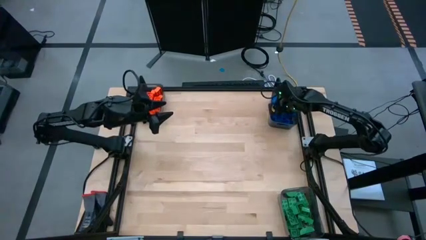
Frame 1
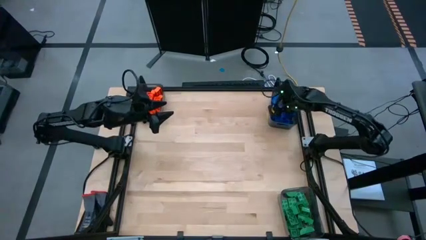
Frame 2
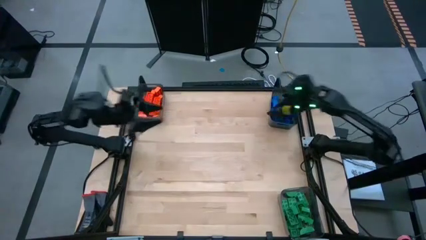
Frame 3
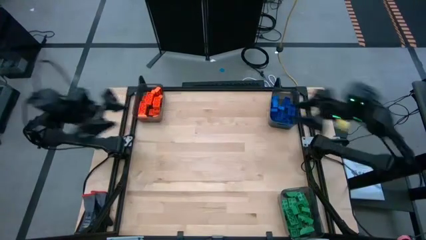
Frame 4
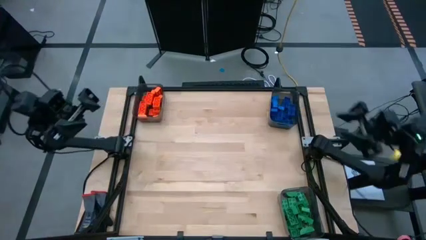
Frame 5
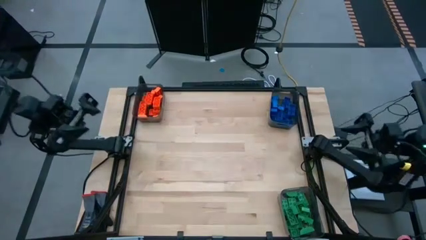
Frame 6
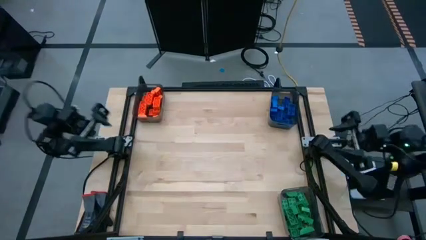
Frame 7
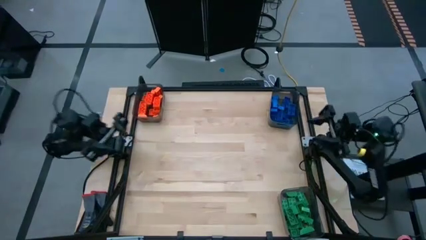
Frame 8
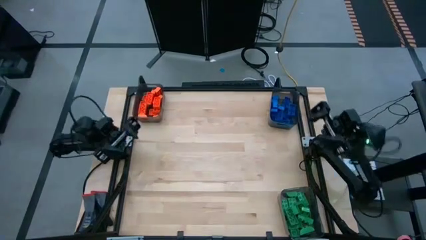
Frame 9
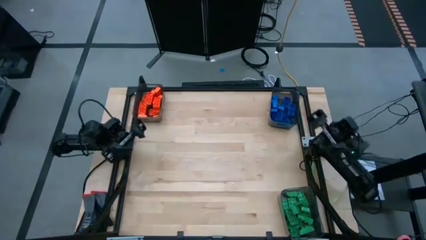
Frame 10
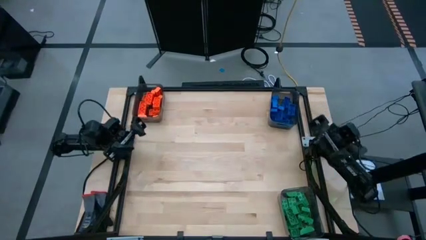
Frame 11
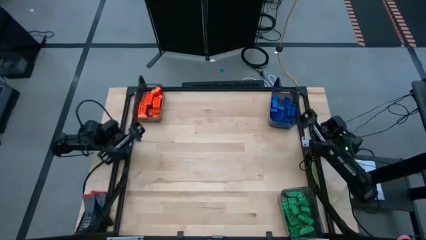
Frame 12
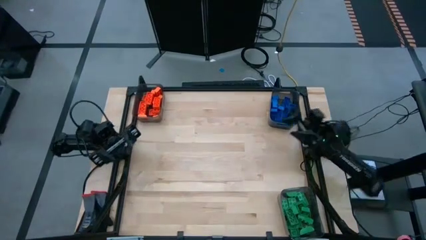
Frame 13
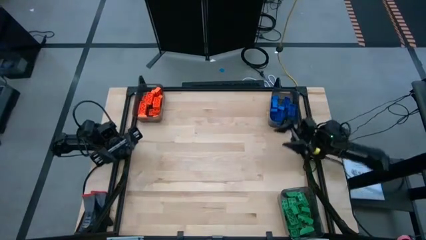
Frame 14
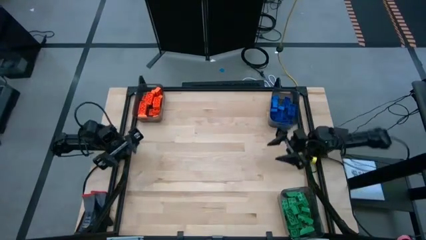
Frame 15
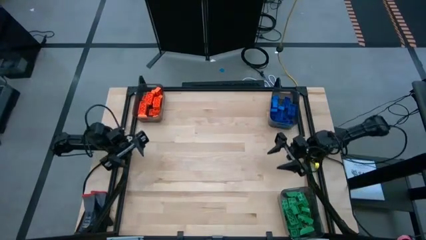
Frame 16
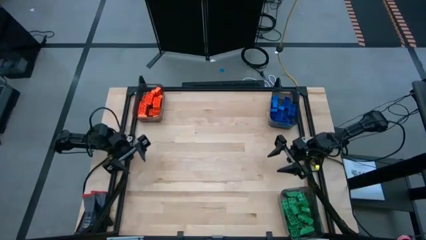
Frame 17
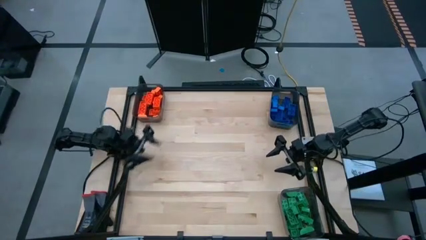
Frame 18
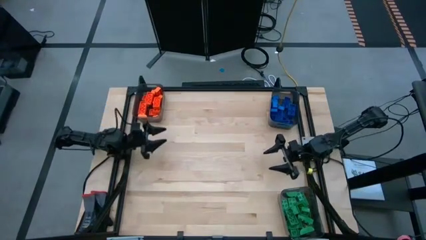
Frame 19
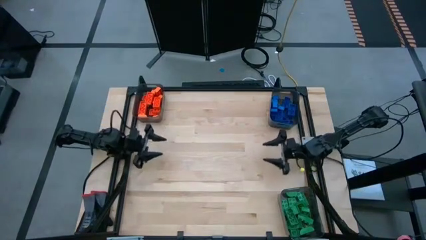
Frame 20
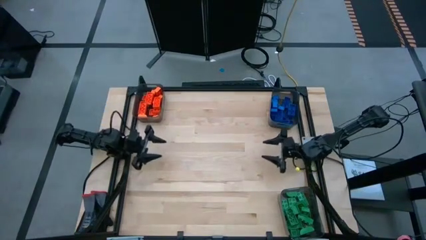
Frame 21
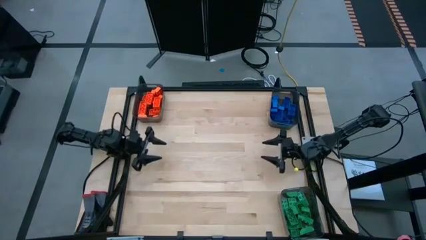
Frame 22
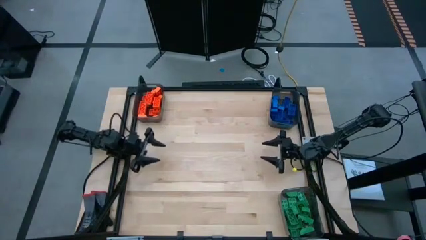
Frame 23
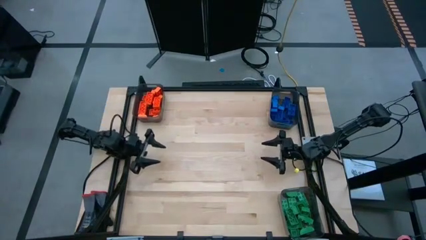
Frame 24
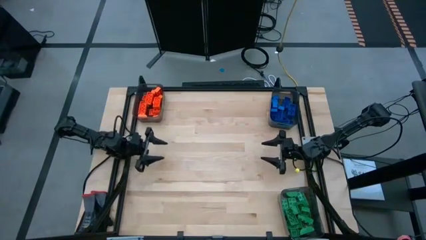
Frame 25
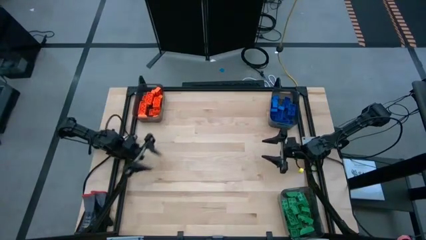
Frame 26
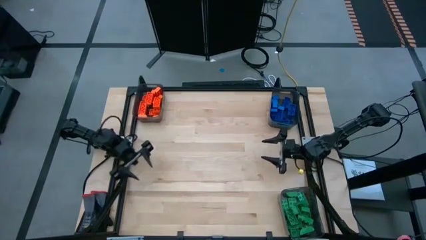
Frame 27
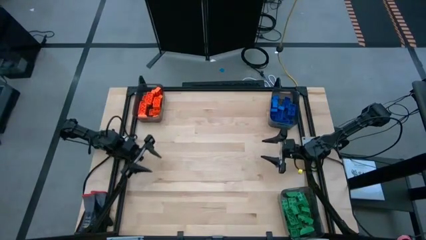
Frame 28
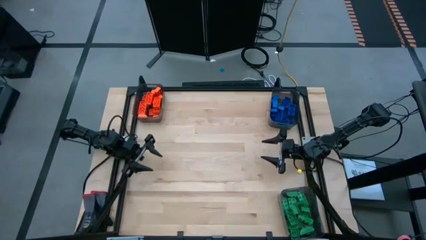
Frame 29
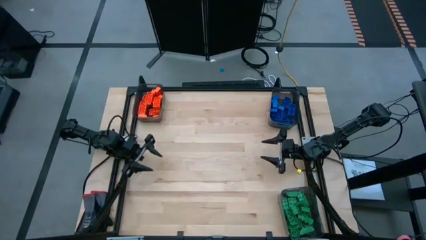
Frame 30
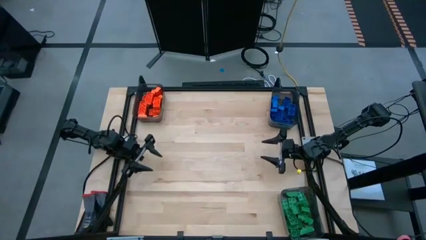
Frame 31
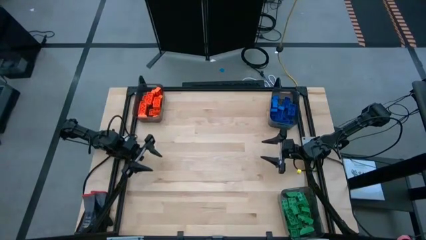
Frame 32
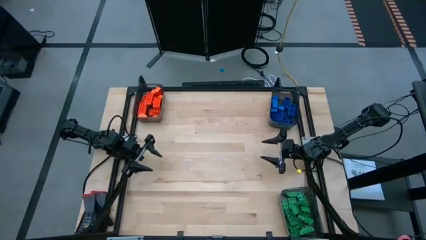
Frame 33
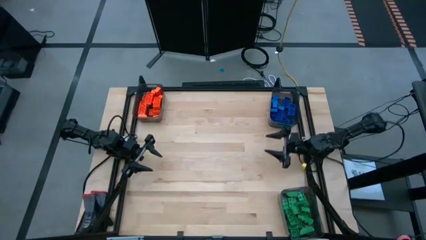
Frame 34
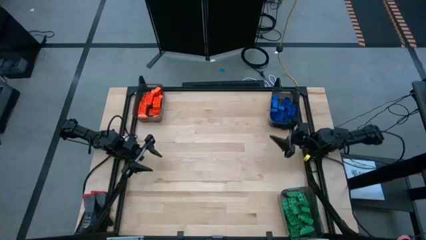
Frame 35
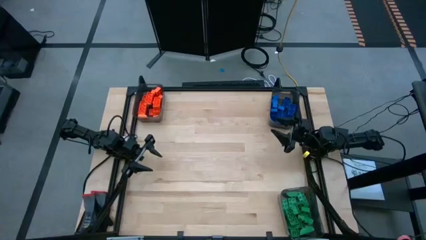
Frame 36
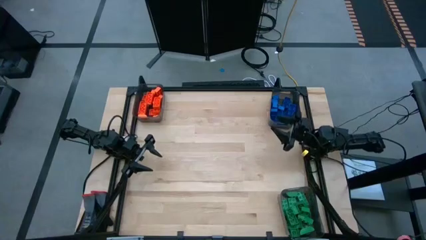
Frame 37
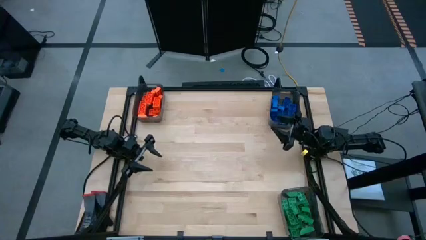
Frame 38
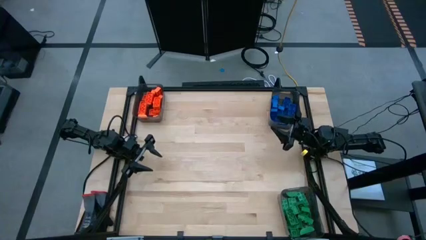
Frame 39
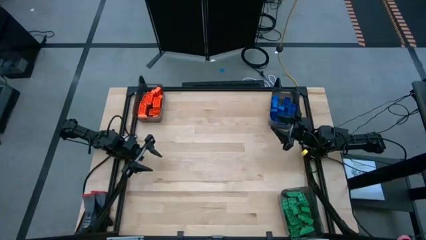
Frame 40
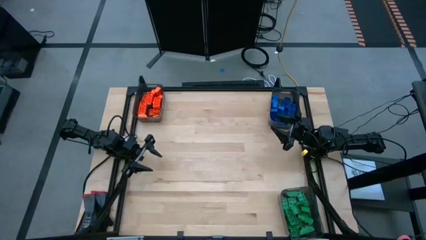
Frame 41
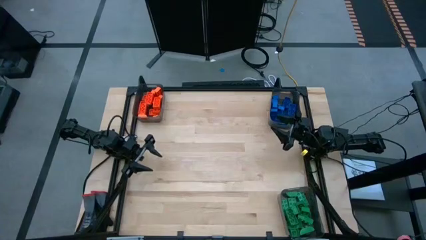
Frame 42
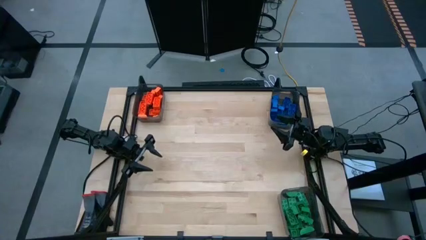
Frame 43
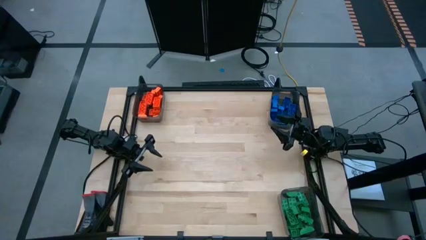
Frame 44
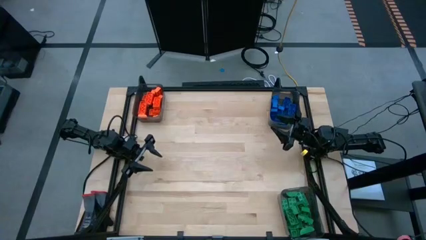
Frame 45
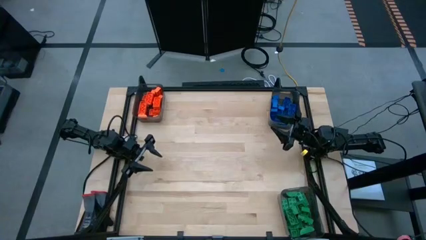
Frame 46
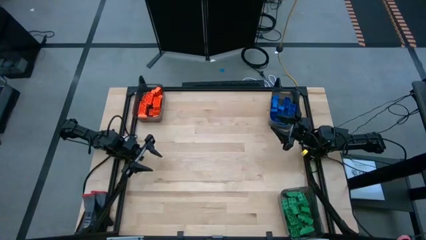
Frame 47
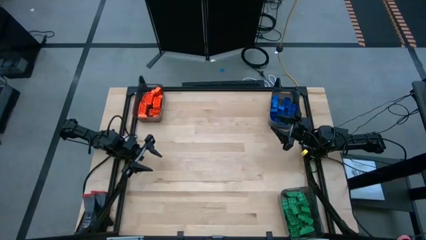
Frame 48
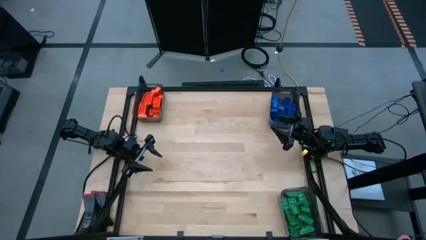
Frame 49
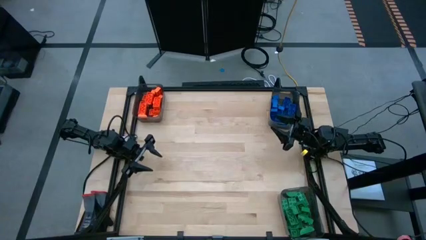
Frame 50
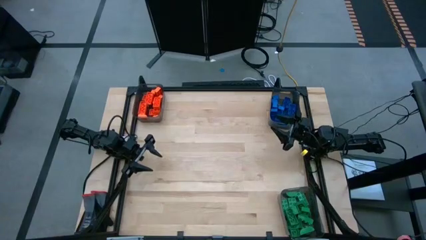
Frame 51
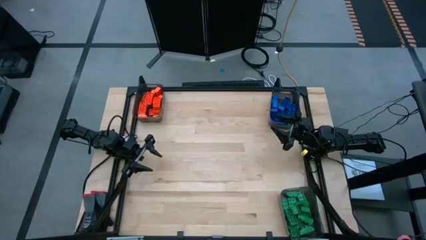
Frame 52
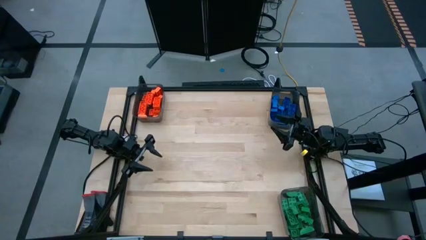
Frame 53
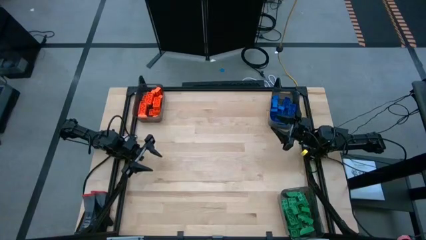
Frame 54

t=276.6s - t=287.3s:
Task: Sort blocks
Return to Home Position

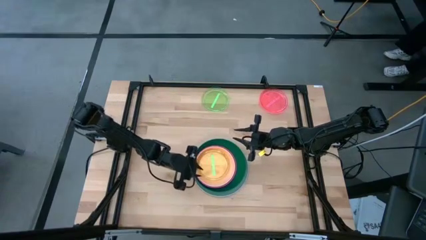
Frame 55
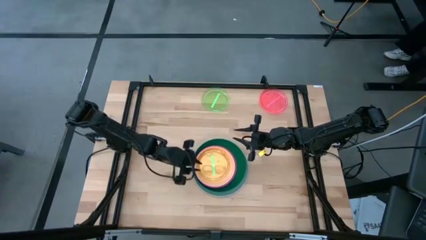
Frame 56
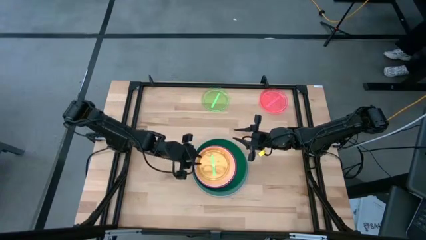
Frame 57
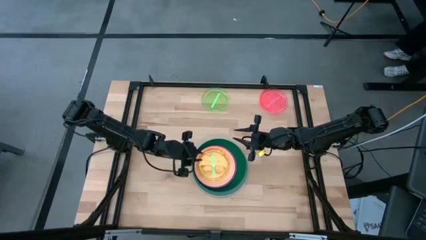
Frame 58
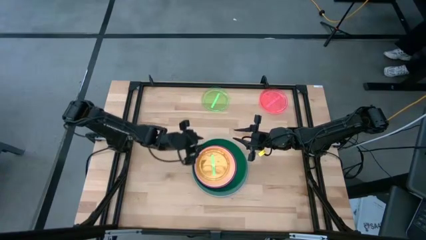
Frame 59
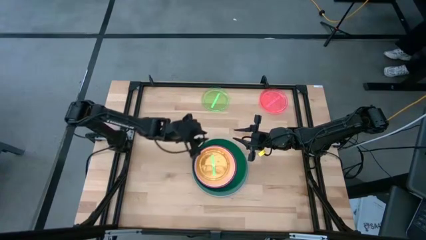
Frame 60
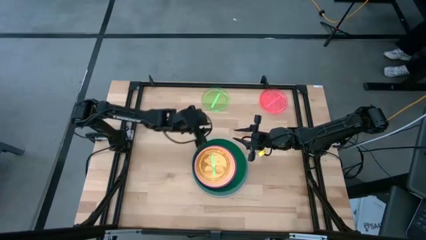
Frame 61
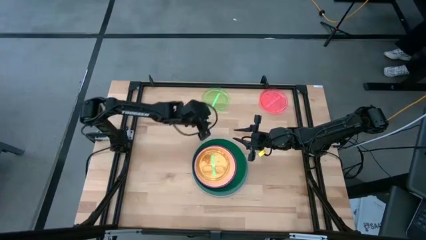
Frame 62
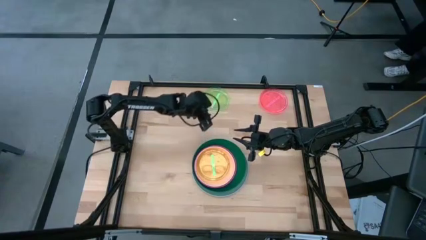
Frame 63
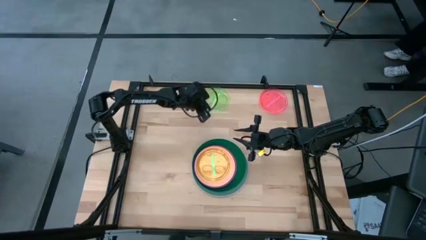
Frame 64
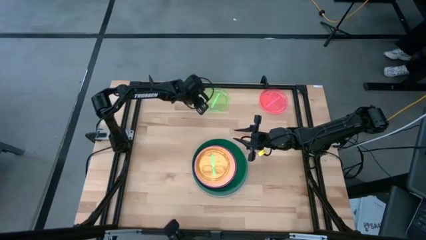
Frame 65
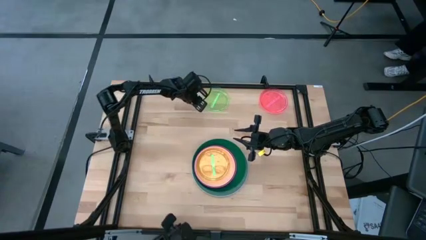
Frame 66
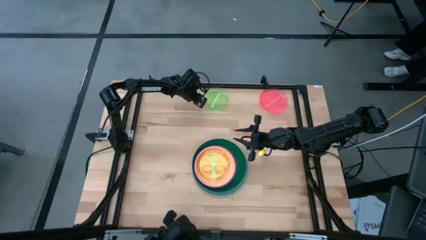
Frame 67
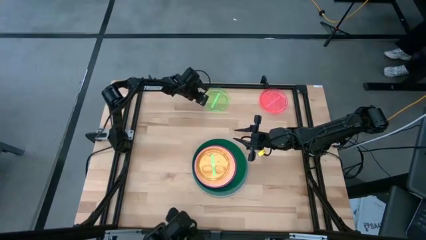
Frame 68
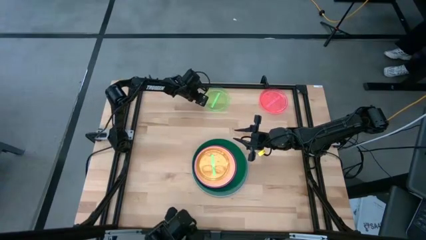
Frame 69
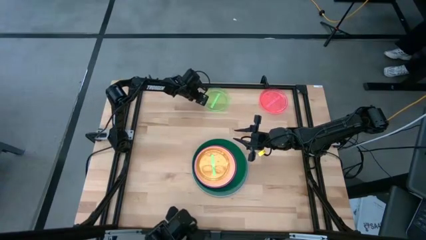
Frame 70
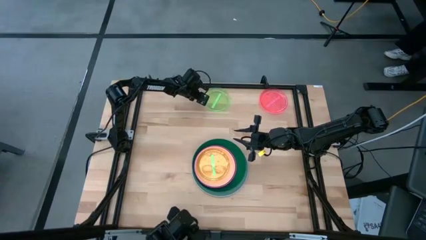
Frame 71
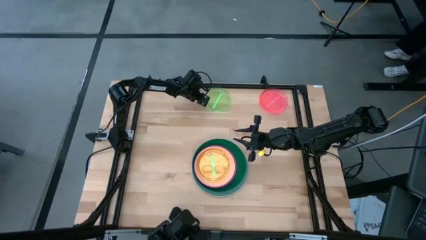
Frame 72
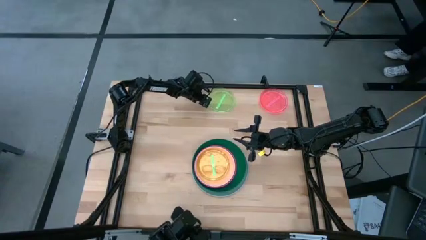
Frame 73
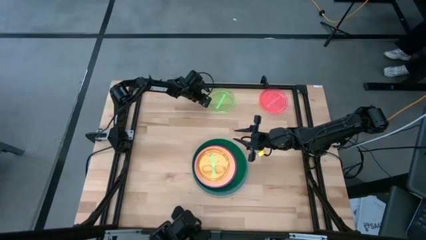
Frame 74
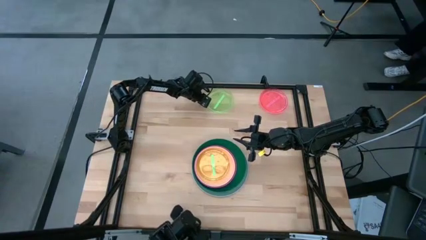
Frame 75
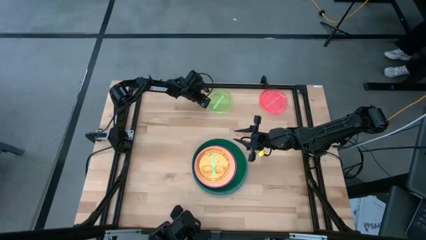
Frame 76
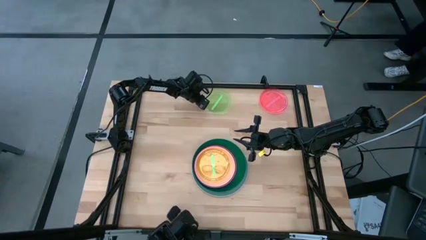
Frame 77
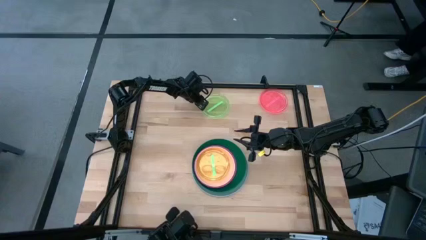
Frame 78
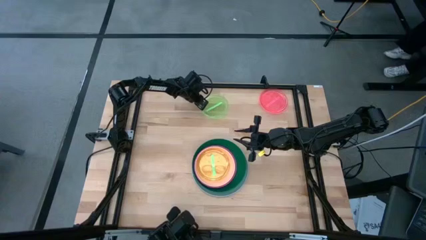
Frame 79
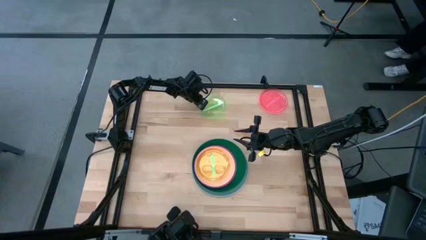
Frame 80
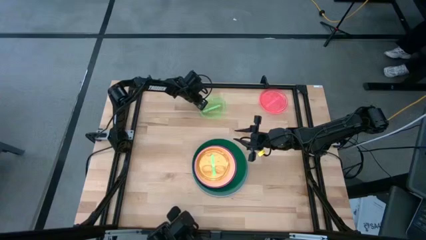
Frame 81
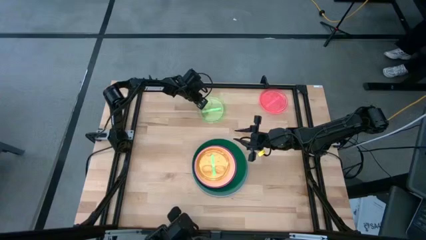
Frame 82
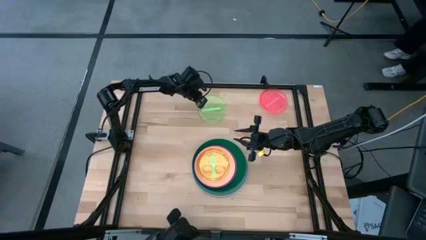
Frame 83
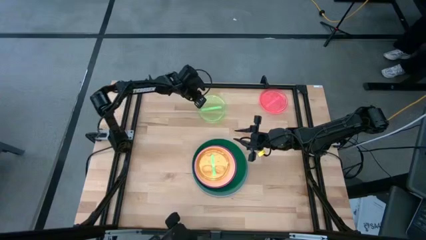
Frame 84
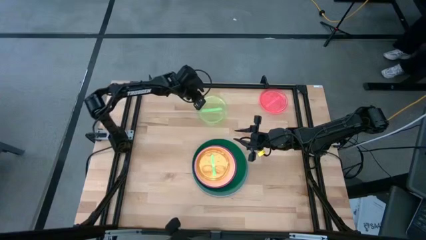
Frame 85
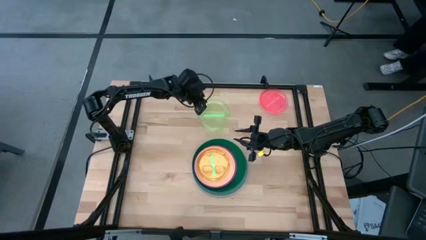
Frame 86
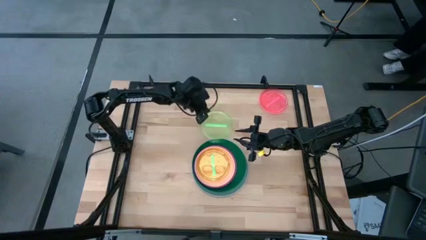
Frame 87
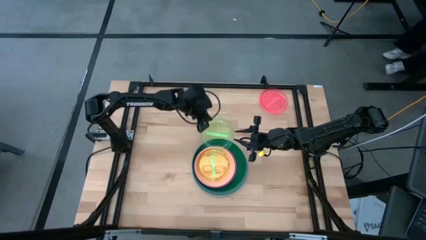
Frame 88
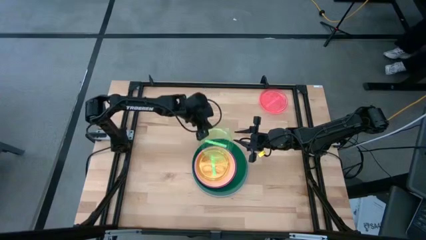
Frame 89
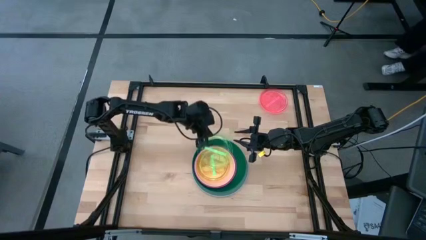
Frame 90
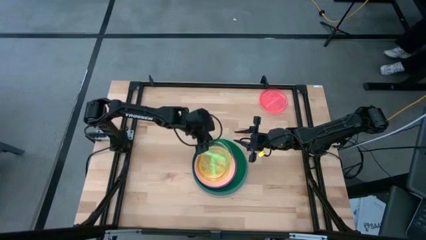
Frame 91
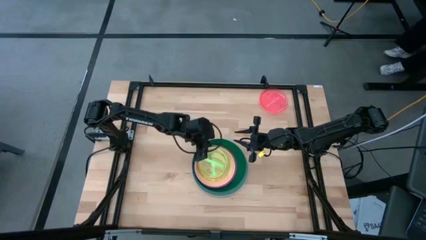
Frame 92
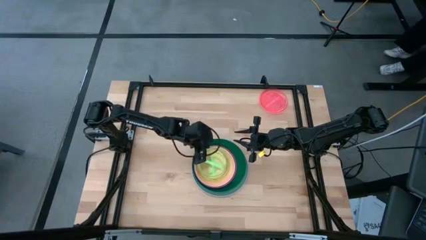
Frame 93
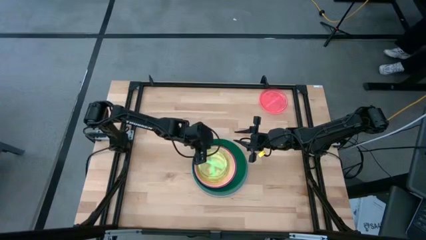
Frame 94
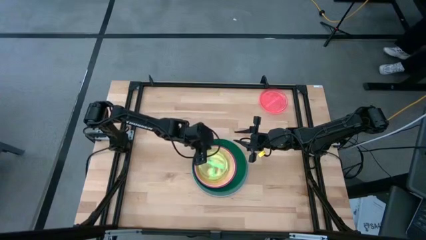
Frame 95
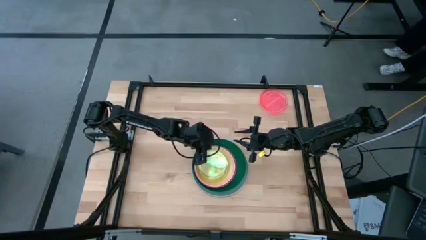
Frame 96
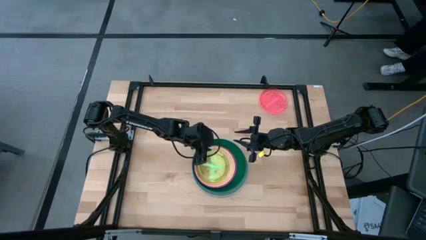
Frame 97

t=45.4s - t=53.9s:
Task: Stack plastic plates
Stack the green transparent plate on top of the green transparent plate
